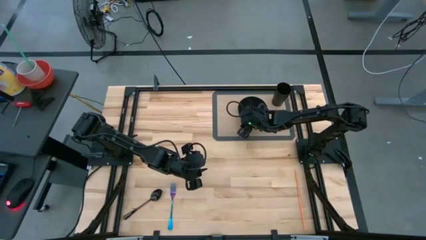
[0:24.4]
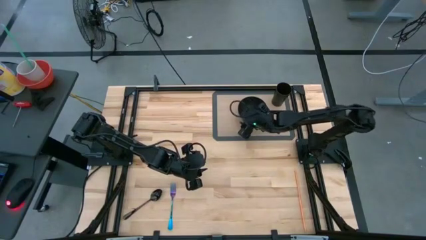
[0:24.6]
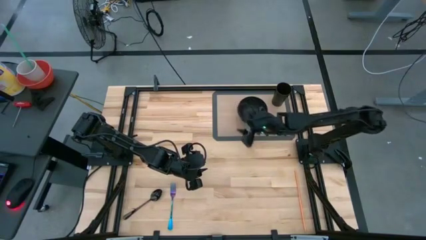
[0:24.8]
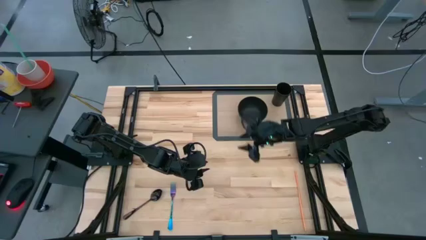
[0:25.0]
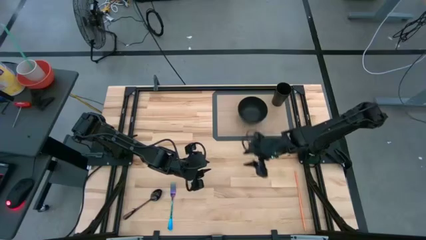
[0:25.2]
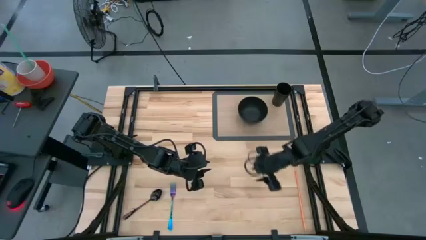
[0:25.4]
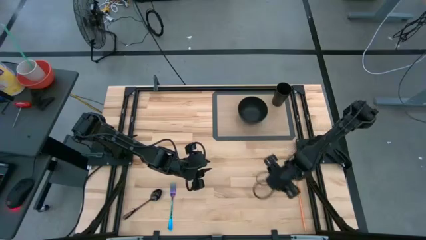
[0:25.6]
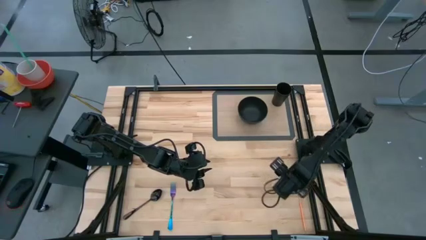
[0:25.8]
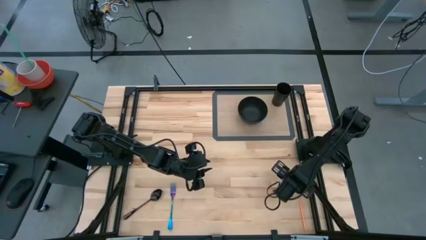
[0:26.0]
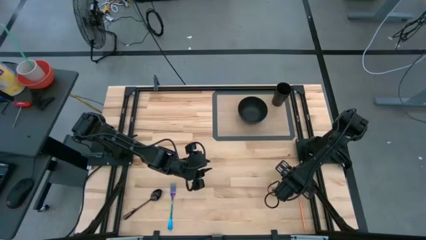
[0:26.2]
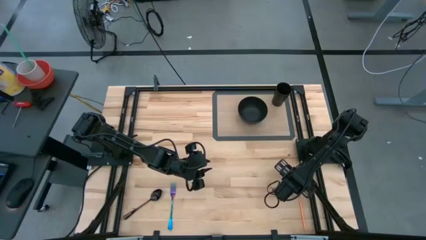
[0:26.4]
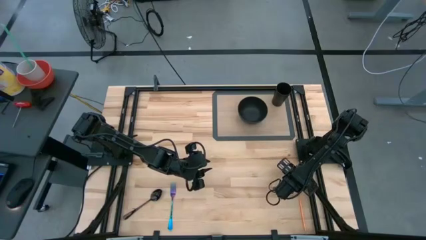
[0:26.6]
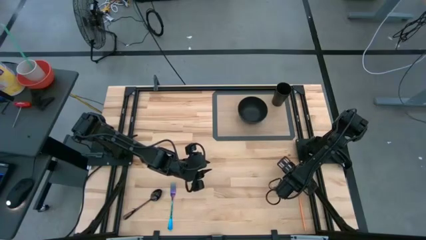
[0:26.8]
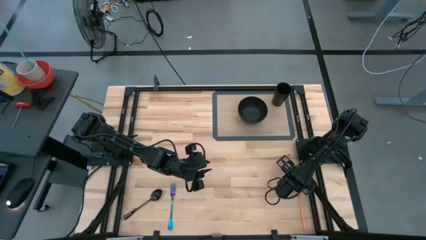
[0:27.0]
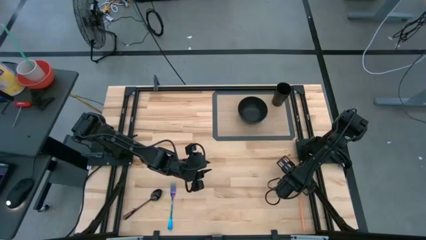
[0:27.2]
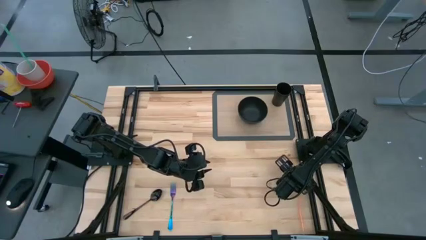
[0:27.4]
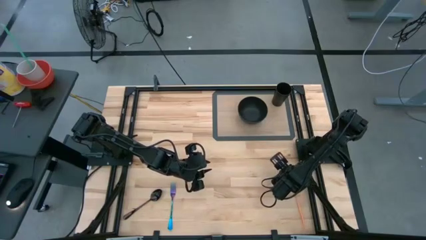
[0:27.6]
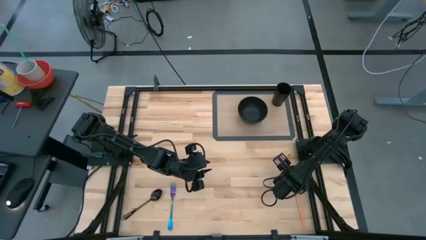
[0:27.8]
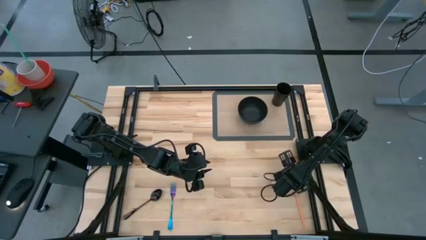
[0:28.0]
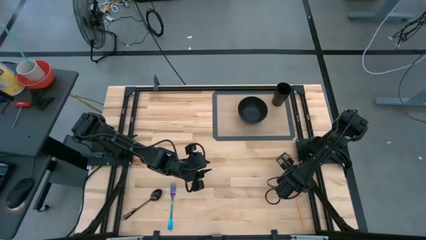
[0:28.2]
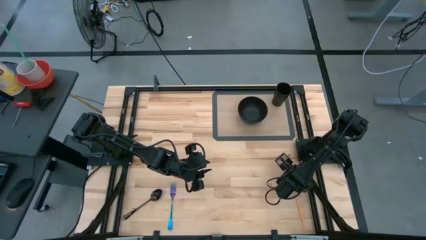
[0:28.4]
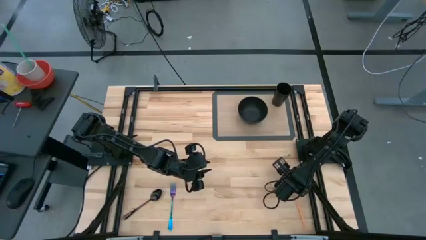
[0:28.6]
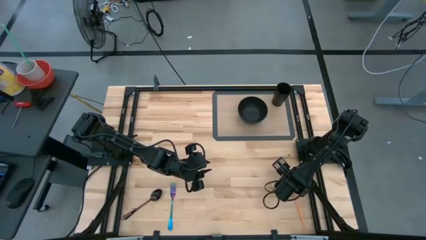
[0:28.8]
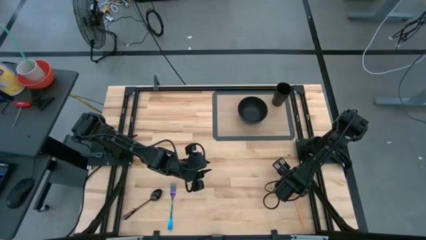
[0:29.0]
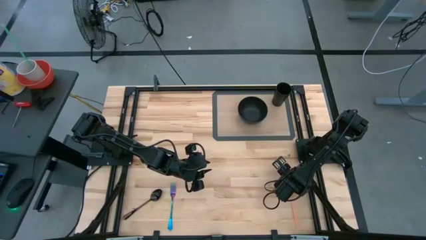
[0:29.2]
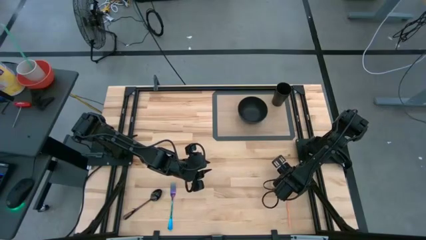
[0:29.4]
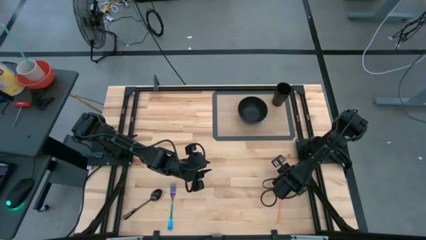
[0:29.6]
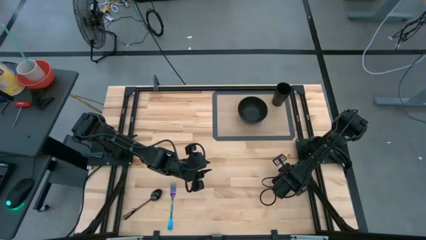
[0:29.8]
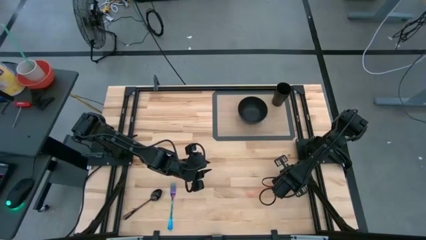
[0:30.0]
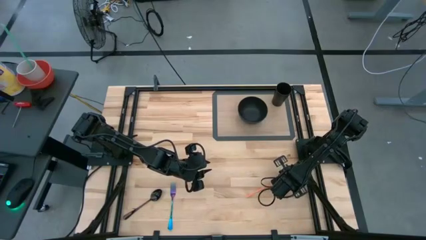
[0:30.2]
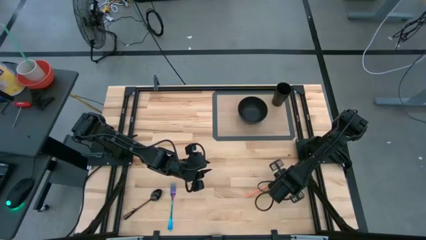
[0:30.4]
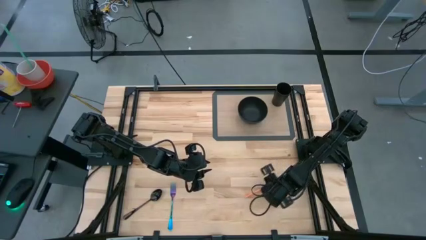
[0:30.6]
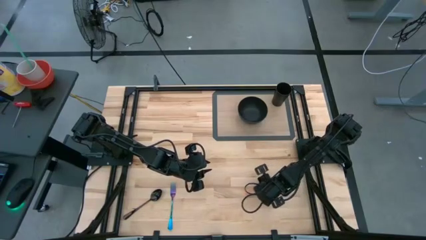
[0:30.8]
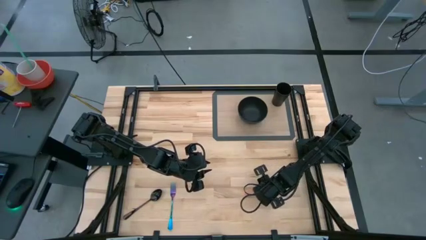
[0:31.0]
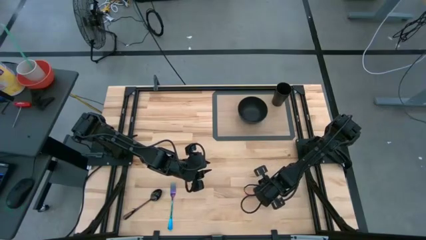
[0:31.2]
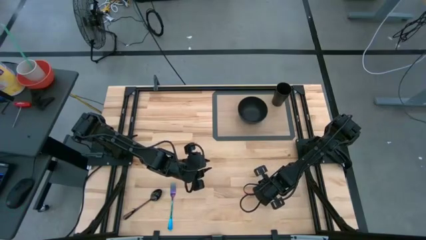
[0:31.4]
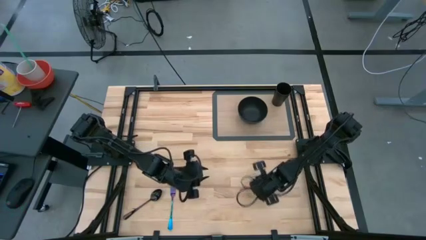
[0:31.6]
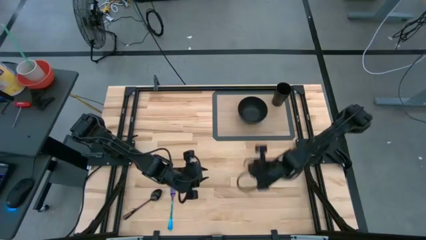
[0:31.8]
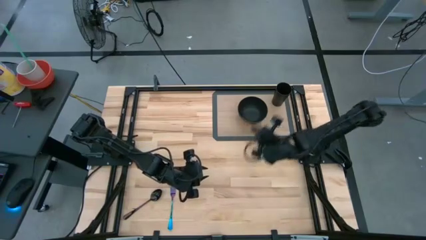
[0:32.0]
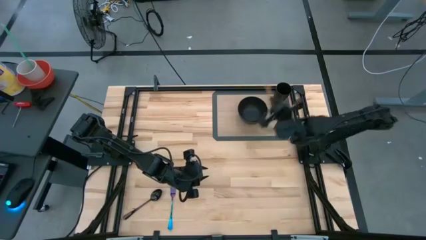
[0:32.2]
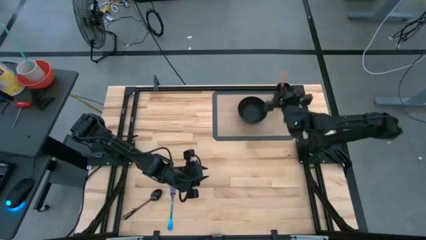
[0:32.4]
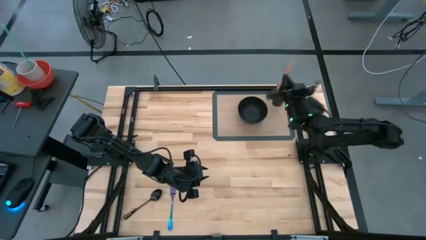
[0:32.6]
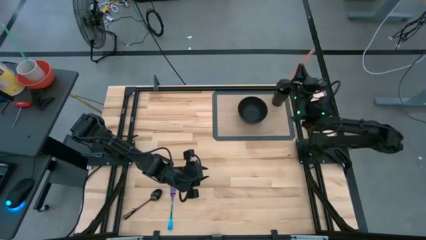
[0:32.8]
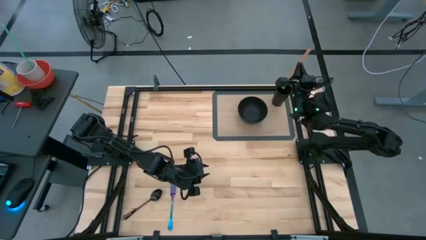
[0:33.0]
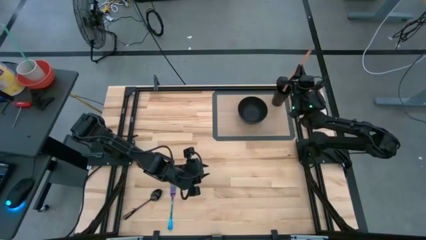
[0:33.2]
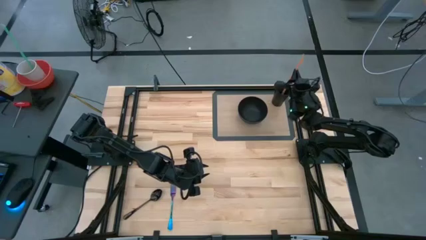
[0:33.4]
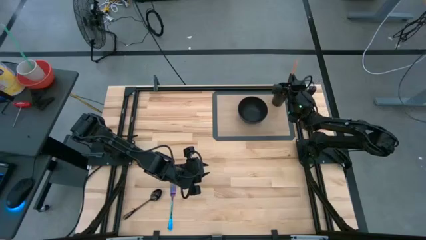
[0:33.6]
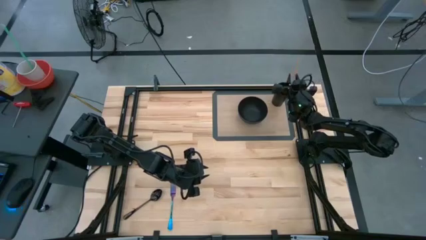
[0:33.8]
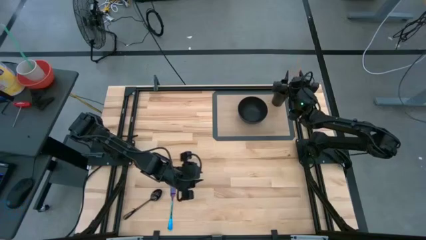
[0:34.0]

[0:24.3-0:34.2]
Task: Pick & Place Utensil
Put the orange straw into the black cup on the transparent mat

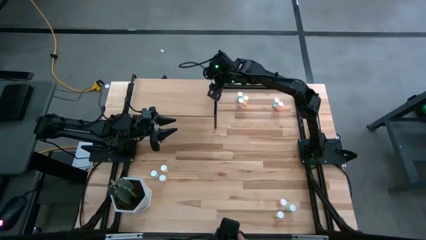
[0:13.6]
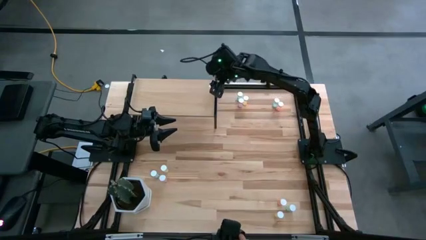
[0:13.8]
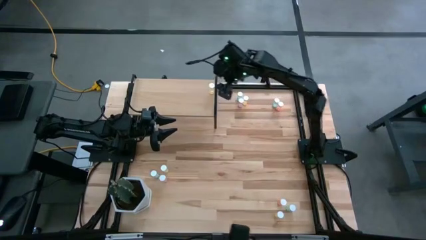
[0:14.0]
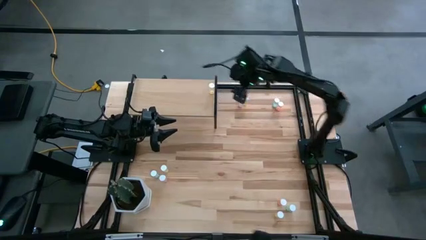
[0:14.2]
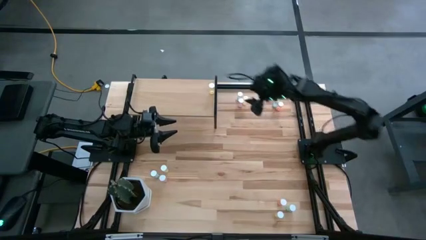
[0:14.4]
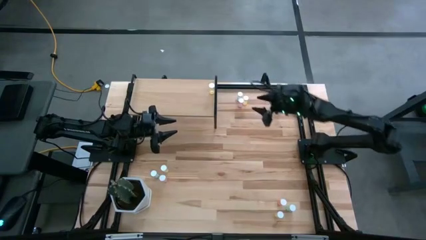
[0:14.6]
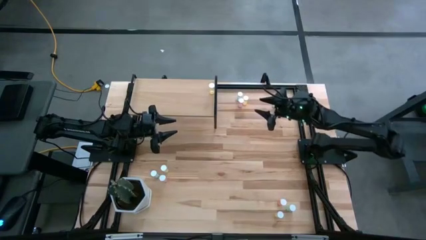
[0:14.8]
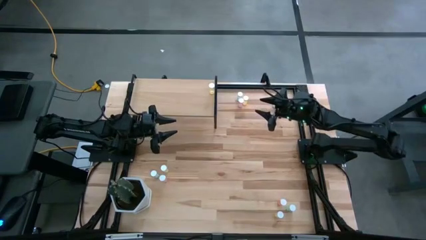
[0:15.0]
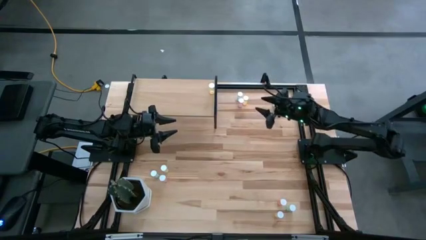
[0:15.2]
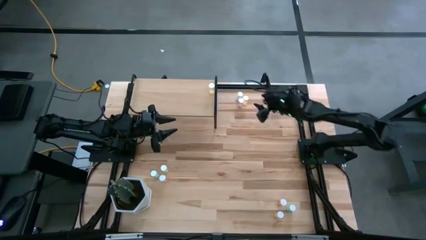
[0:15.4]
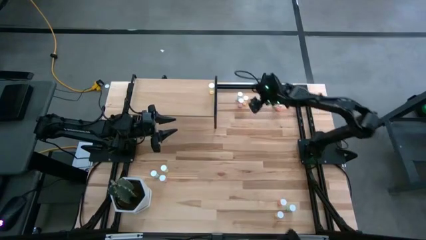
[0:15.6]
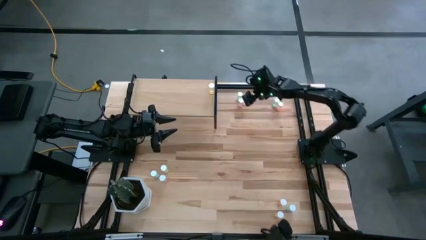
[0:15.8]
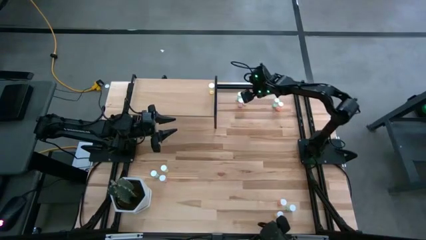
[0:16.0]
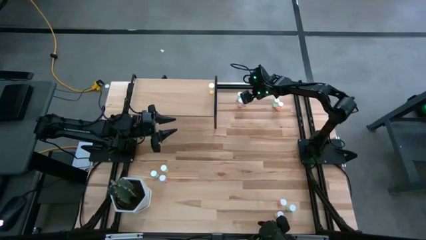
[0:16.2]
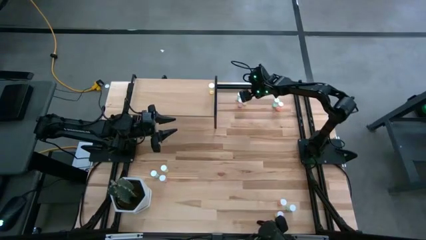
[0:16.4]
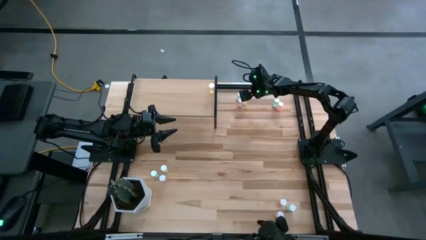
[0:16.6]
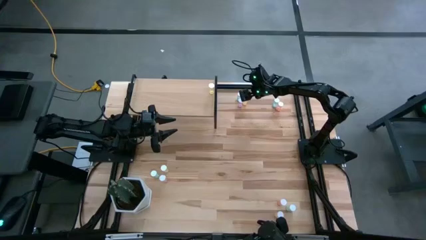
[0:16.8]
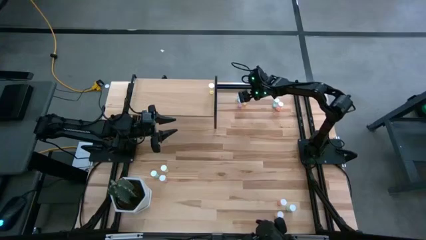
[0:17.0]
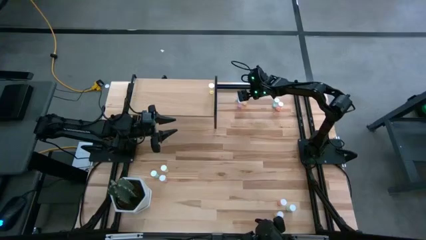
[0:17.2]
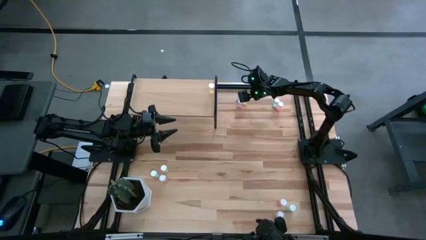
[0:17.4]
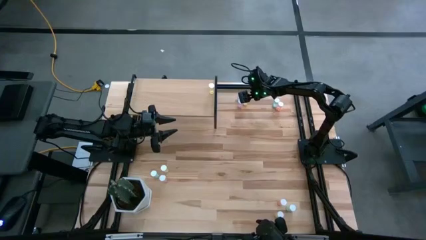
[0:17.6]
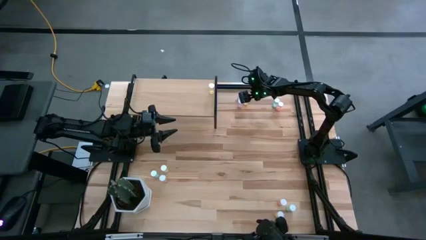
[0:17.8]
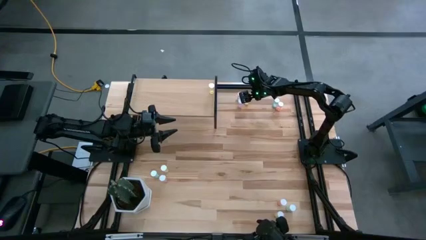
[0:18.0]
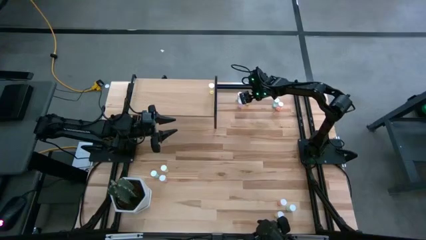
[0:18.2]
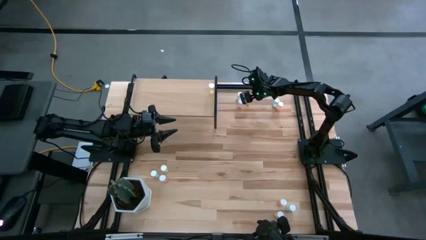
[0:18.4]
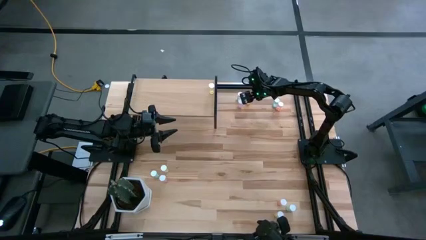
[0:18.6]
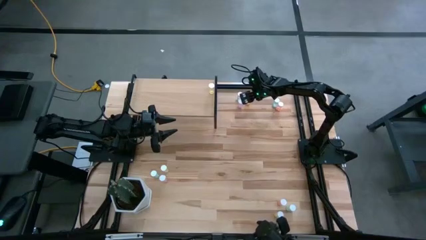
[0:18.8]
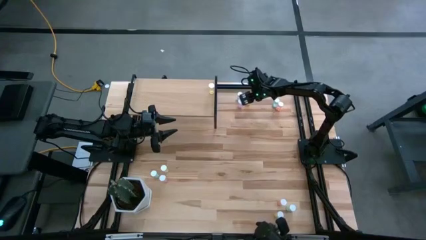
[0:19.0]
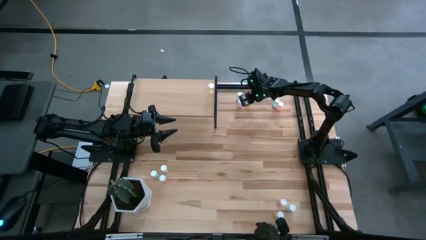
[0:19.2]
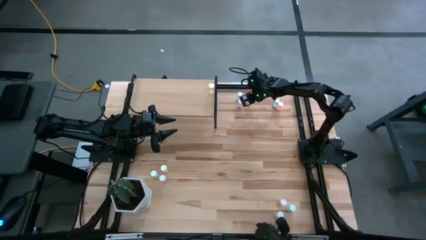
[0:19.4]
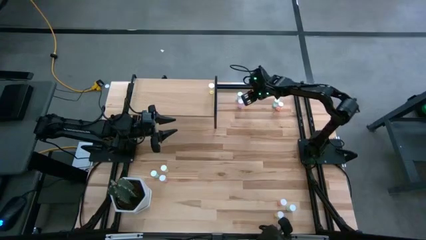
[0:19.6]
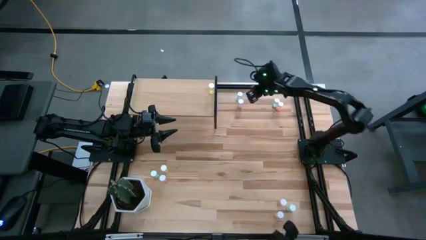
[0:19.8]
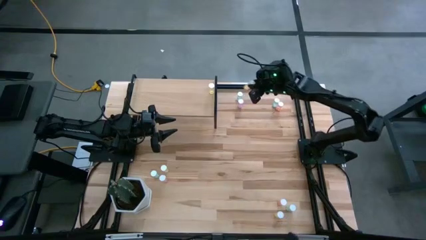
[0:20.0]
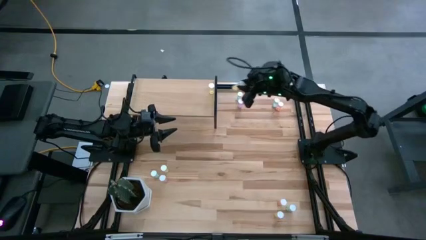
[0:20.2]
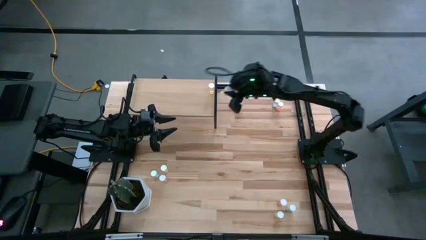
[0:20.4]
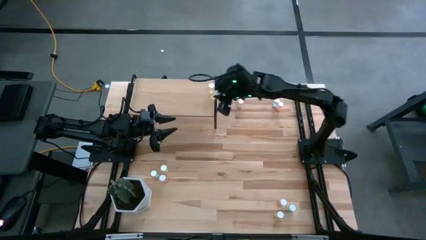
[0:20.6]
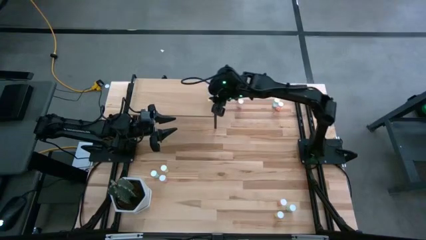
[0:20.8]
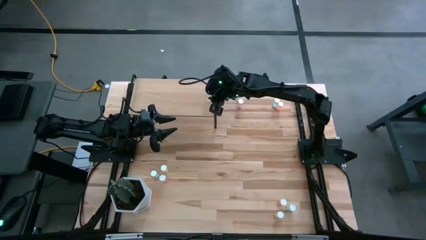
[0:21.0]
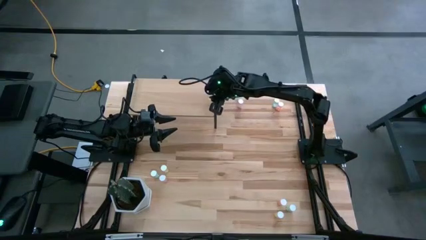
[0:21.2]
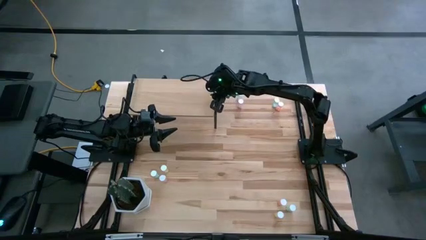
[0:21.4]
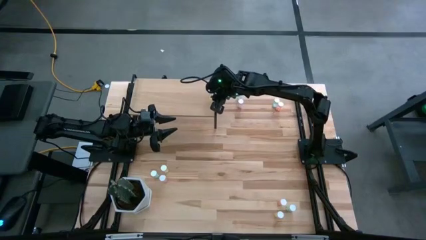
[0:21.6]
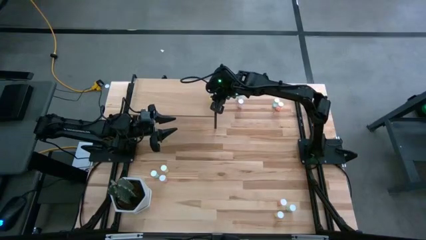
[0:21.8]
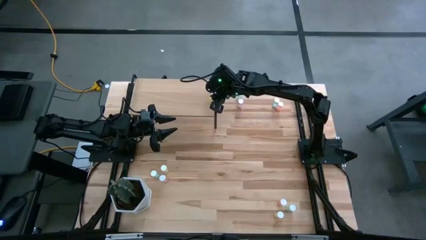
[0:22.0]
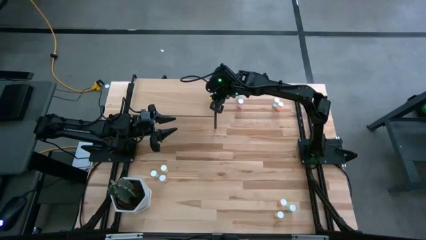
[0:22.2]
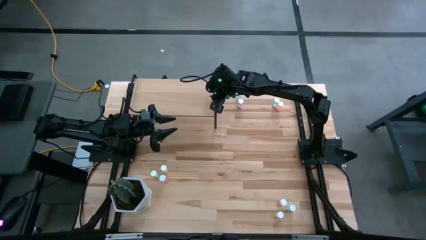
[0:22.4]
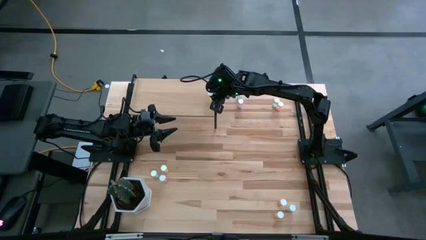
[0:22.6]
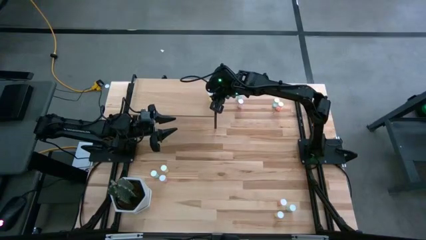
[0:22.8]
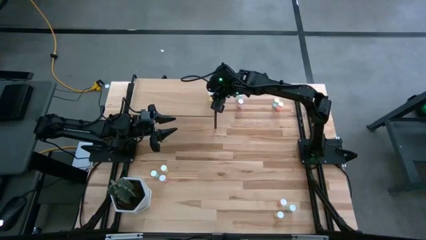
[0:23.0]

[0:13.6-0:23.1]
Task: Pick and place medicine bottles onto shelf by color
Put the top center yellow pill bottle on the shelf
